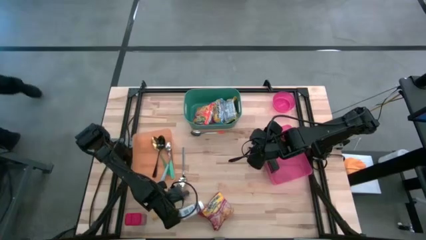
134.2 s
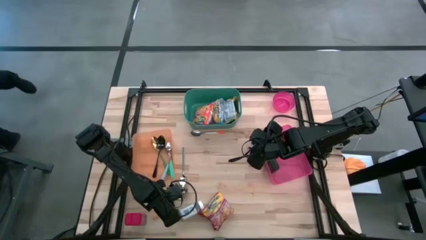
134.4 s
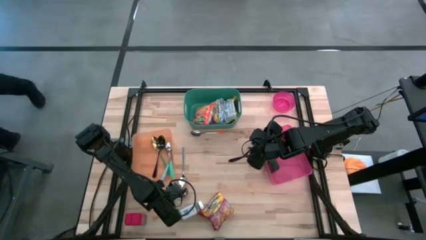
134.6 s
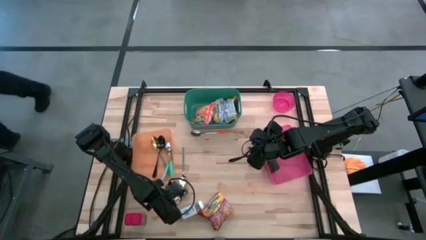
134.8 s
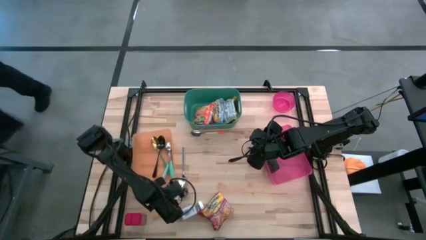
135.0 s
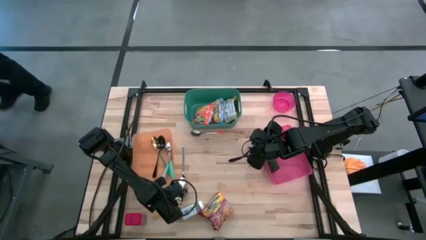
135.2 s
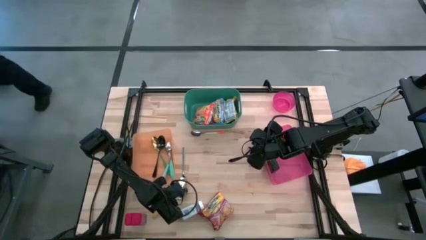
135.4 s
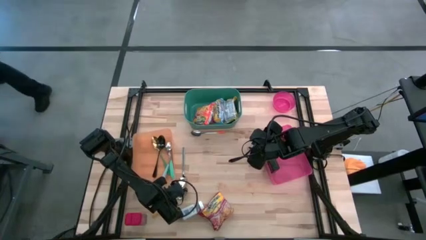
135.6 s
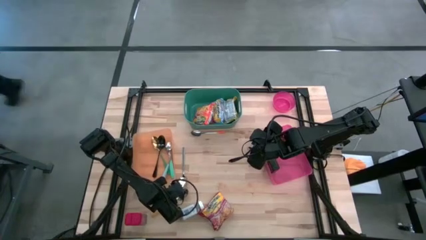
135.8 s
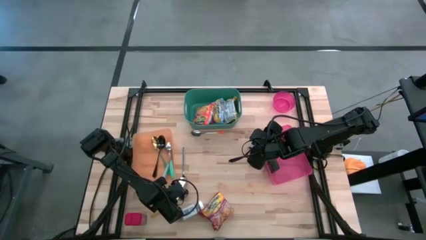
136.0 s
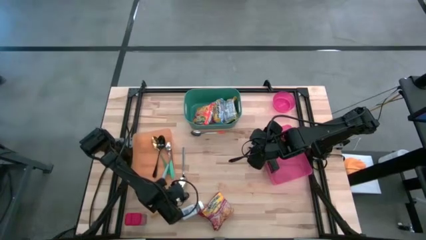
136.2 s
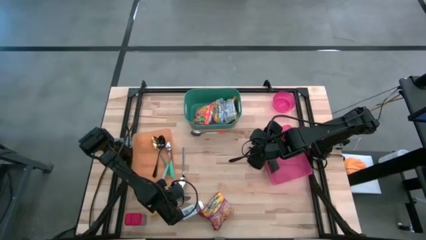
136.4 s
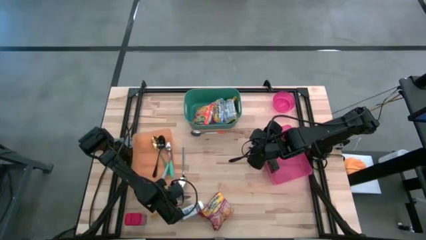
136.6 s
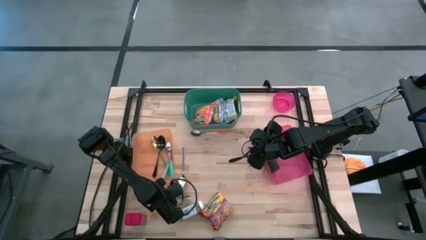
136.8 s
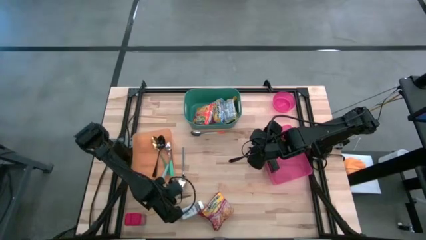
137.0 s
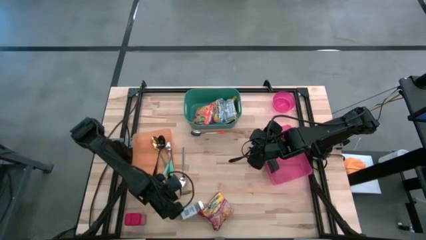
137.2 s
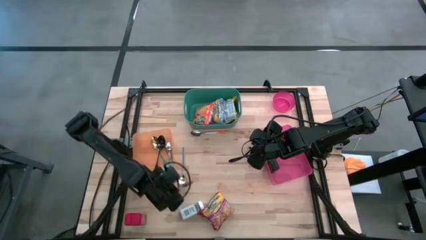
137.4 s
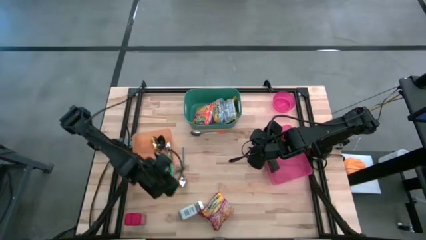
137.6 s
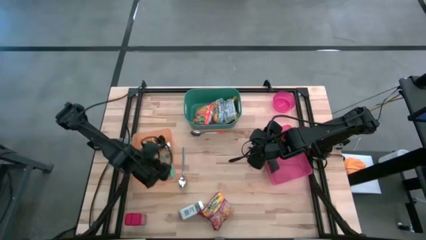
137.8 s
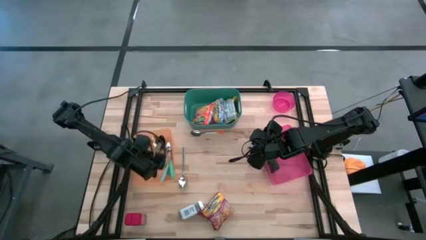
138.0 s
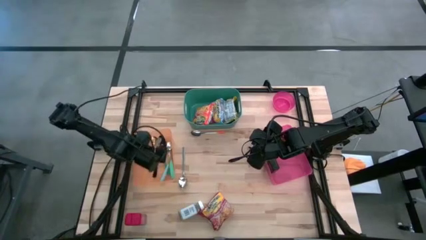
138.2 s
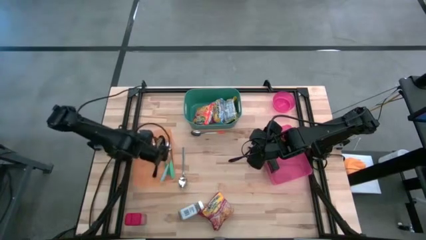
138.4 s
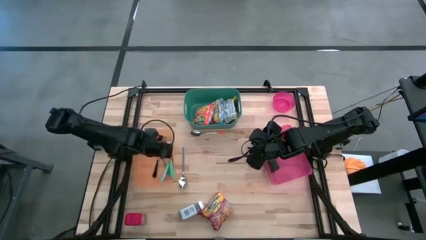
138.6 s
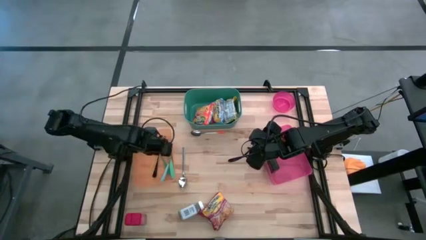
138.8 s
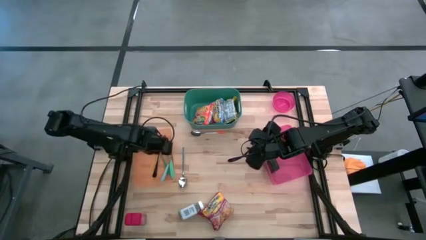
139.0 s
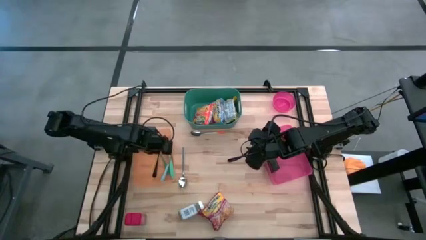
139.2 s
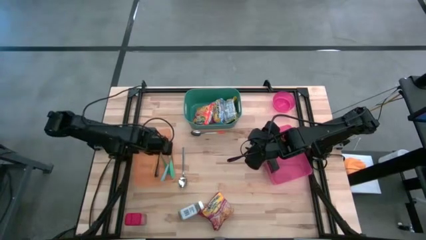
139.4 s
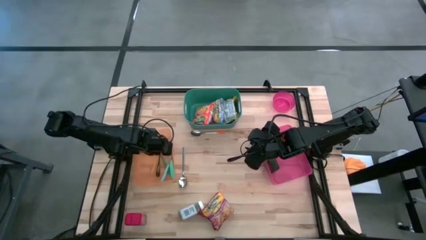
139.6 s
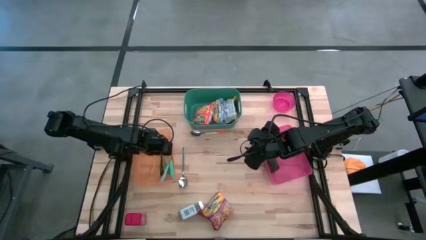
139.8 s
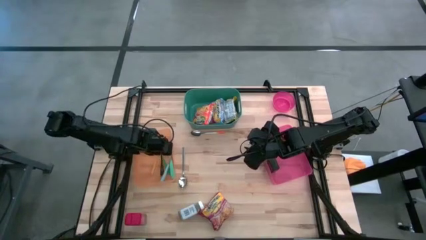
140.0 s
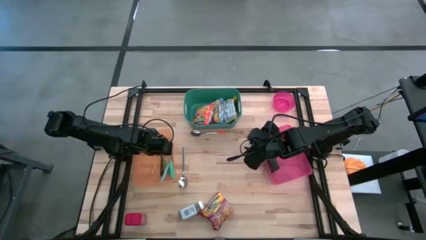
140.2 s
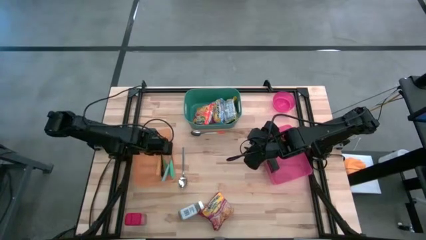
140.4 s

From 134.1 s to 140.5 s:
Put the light orange spoon into the orange bin
